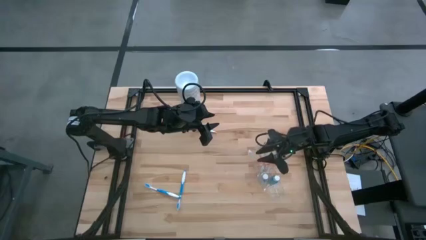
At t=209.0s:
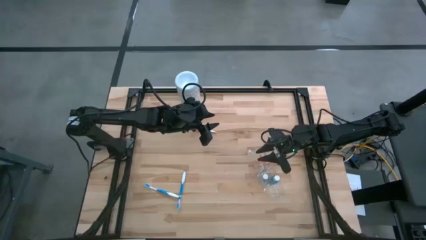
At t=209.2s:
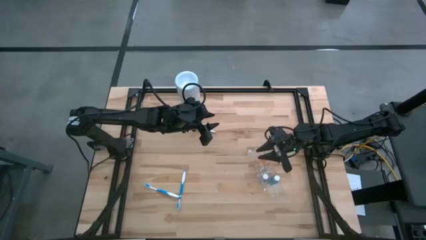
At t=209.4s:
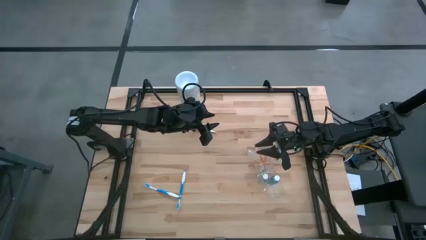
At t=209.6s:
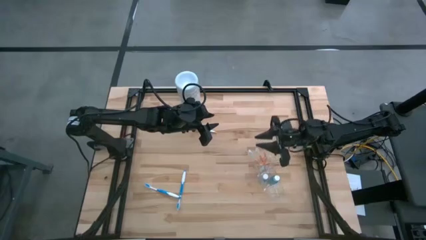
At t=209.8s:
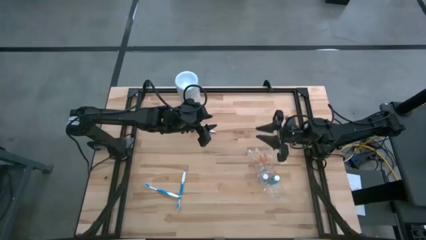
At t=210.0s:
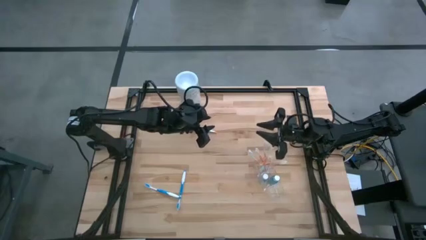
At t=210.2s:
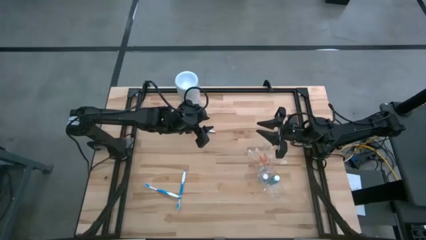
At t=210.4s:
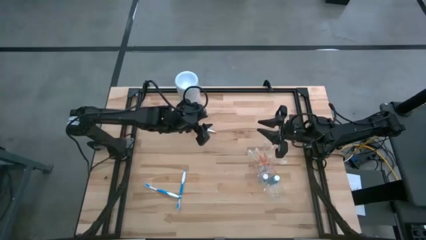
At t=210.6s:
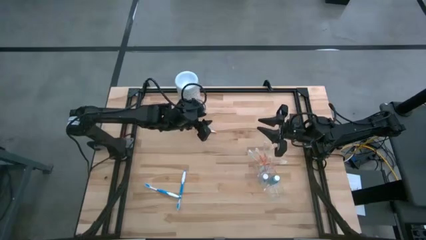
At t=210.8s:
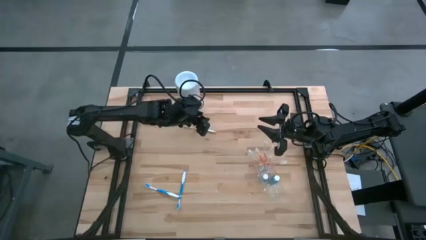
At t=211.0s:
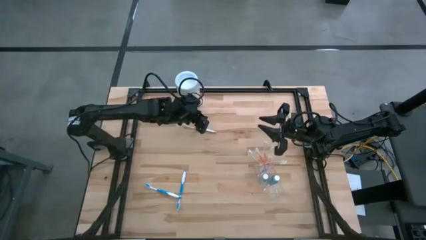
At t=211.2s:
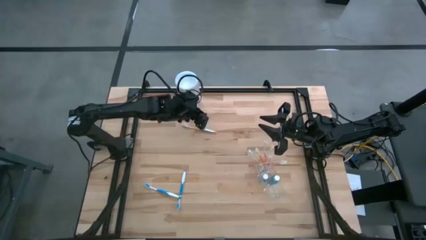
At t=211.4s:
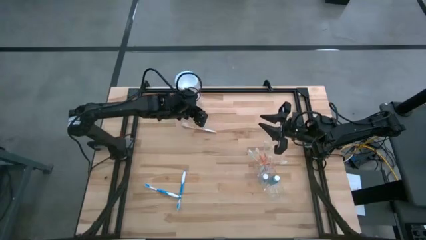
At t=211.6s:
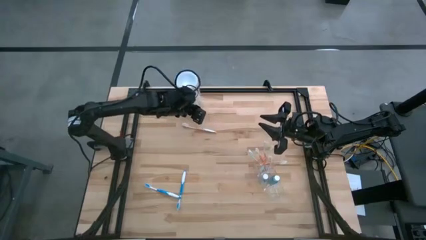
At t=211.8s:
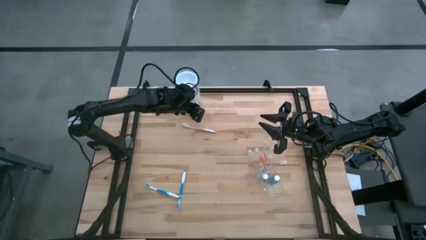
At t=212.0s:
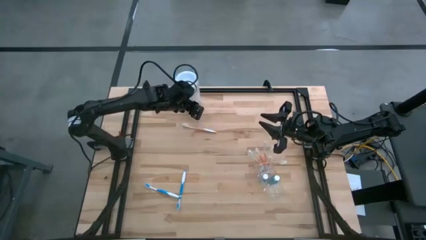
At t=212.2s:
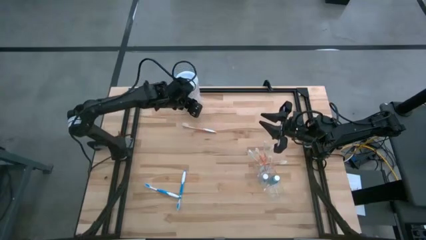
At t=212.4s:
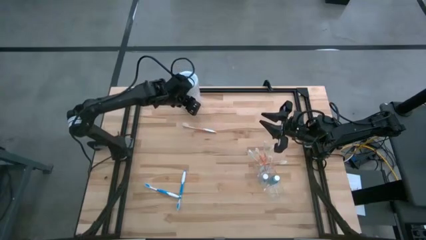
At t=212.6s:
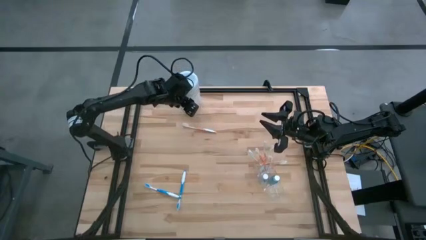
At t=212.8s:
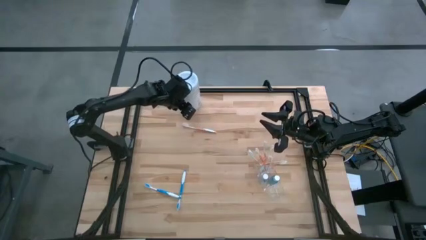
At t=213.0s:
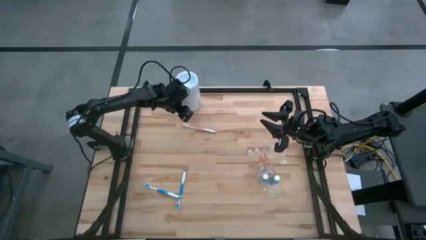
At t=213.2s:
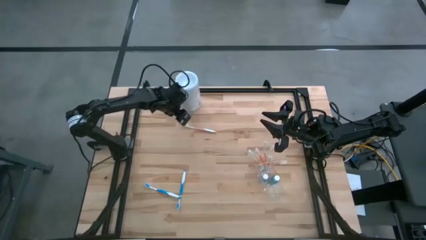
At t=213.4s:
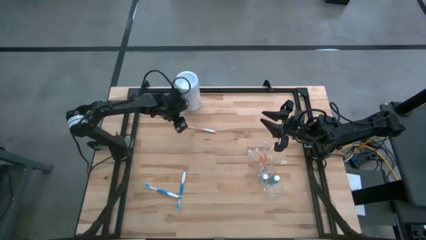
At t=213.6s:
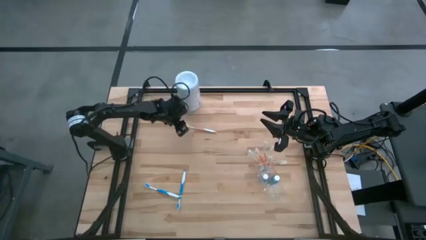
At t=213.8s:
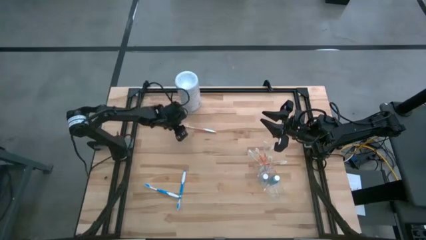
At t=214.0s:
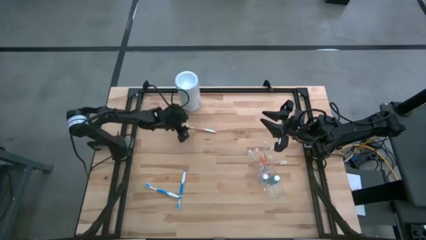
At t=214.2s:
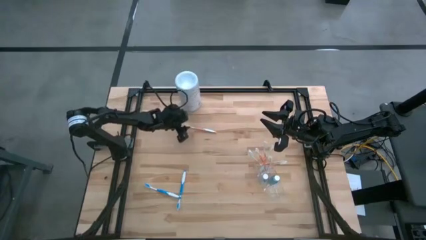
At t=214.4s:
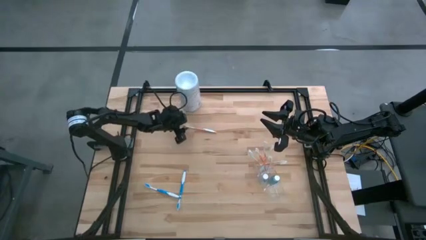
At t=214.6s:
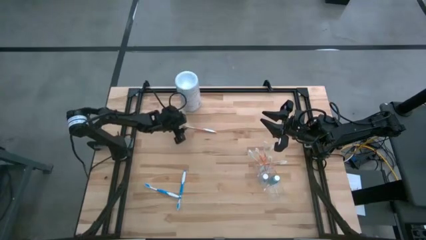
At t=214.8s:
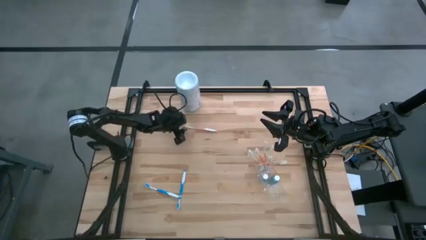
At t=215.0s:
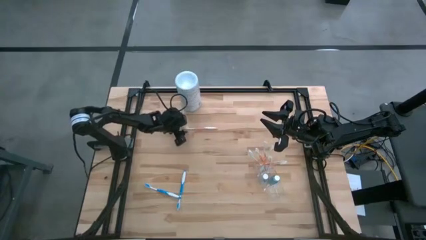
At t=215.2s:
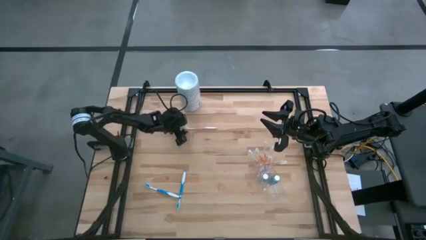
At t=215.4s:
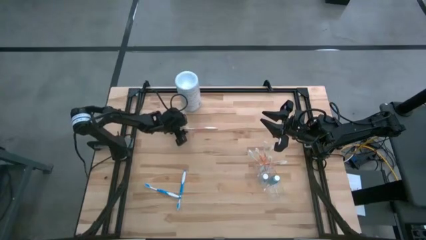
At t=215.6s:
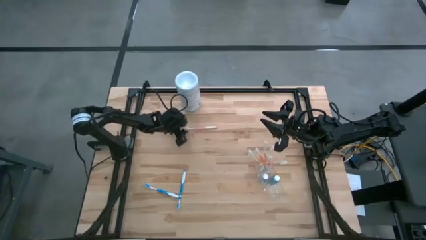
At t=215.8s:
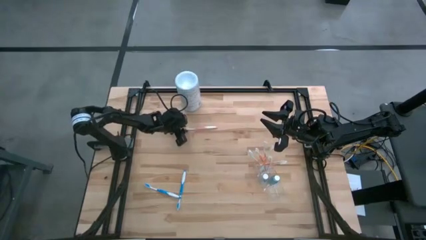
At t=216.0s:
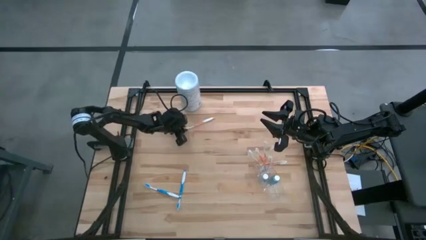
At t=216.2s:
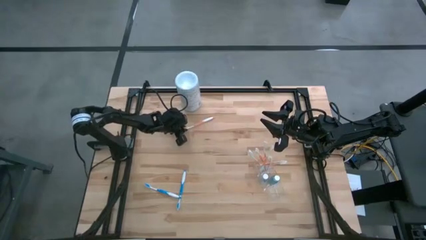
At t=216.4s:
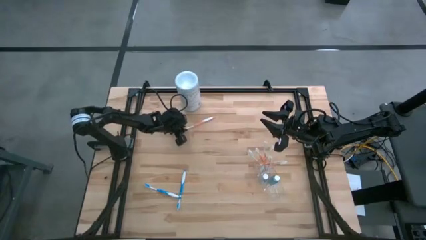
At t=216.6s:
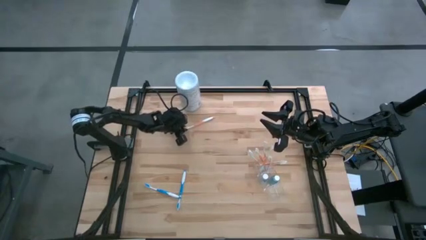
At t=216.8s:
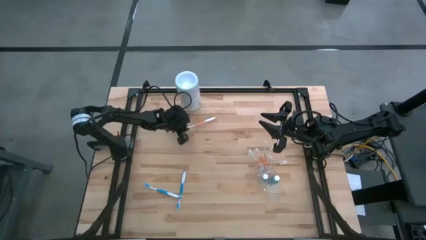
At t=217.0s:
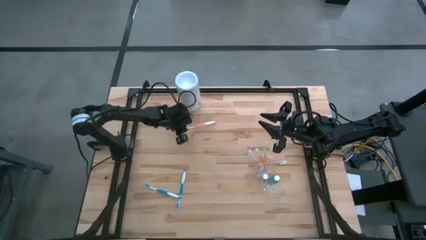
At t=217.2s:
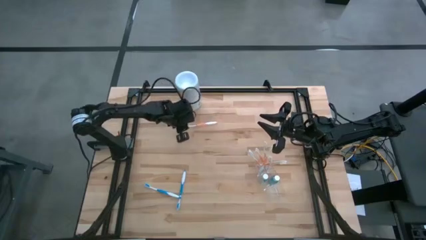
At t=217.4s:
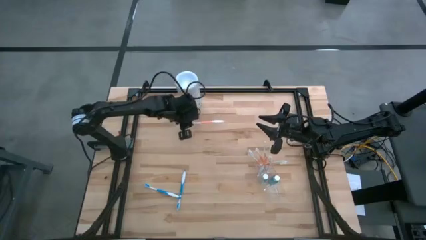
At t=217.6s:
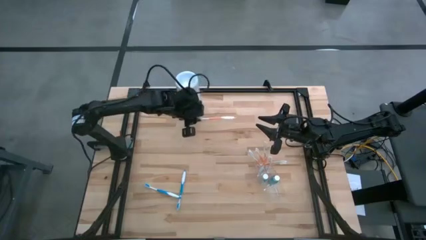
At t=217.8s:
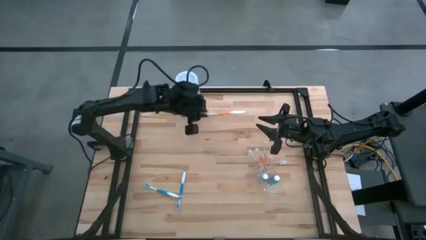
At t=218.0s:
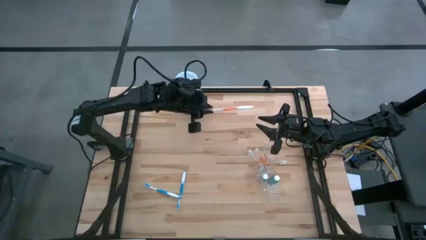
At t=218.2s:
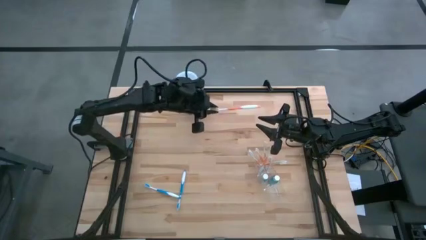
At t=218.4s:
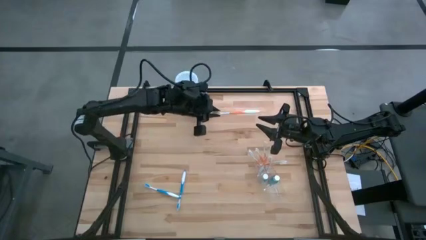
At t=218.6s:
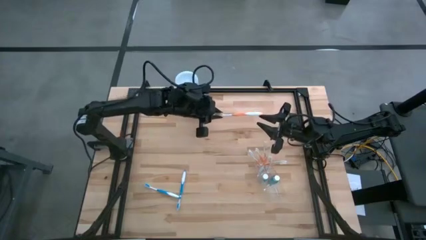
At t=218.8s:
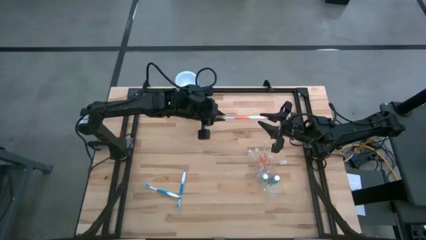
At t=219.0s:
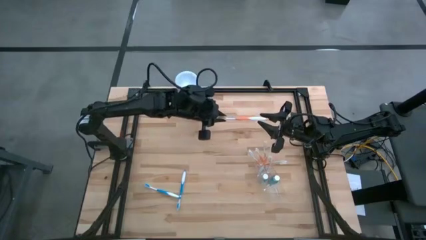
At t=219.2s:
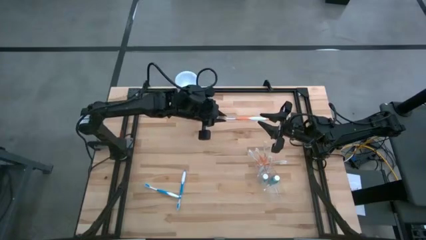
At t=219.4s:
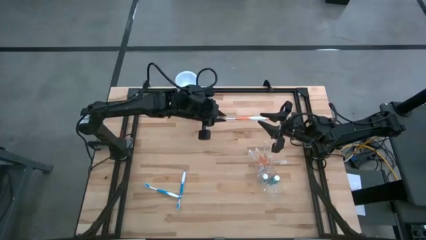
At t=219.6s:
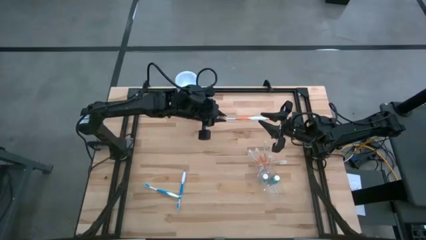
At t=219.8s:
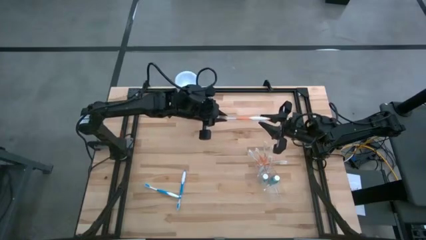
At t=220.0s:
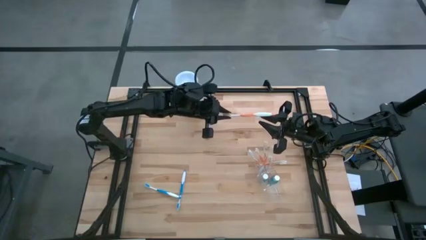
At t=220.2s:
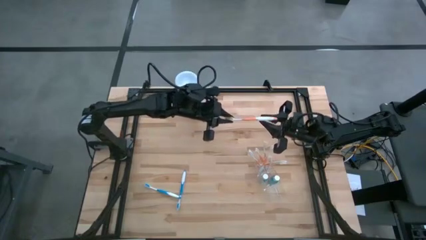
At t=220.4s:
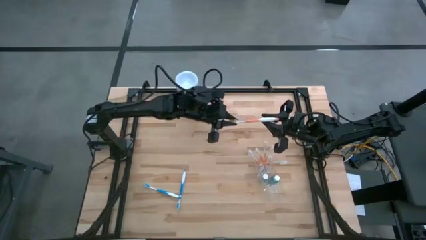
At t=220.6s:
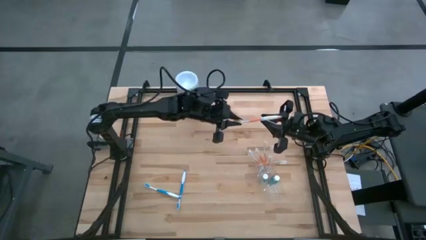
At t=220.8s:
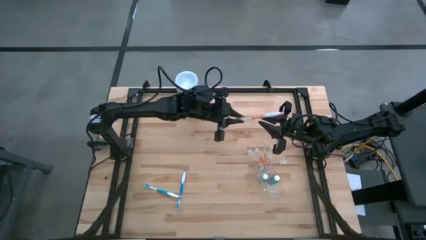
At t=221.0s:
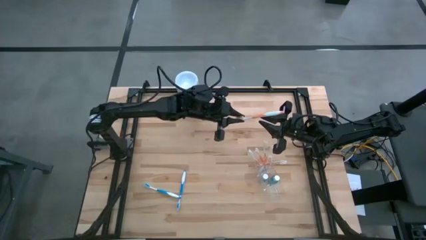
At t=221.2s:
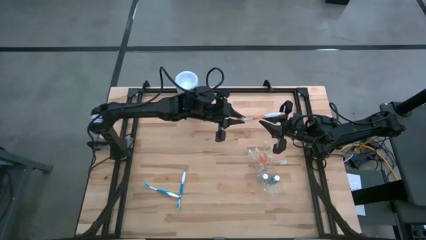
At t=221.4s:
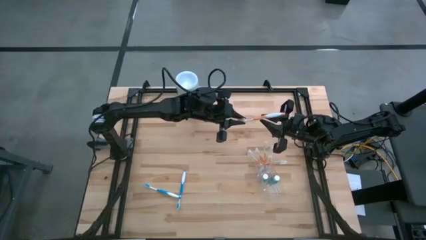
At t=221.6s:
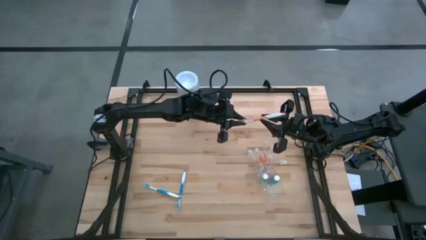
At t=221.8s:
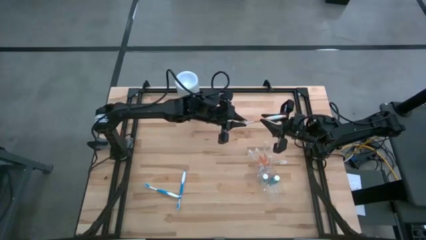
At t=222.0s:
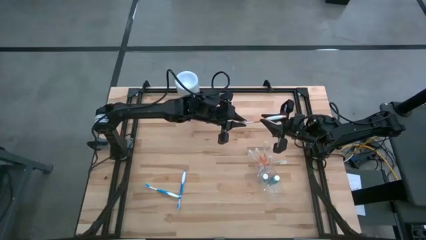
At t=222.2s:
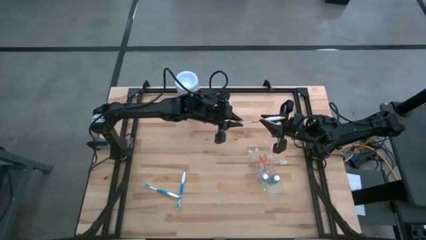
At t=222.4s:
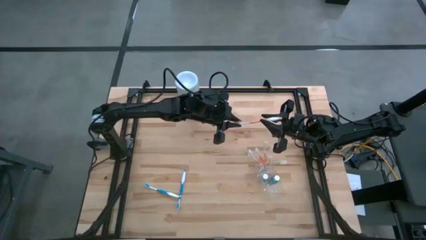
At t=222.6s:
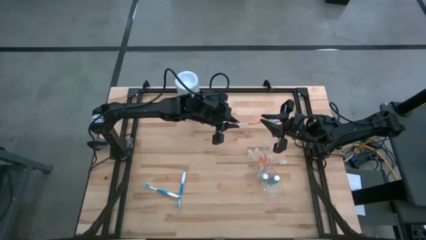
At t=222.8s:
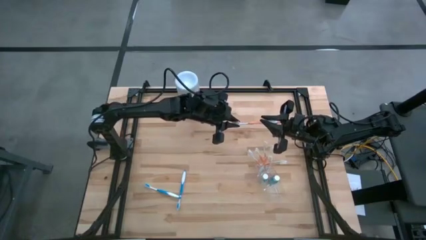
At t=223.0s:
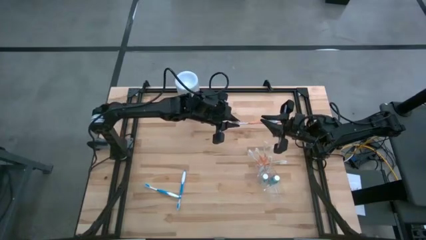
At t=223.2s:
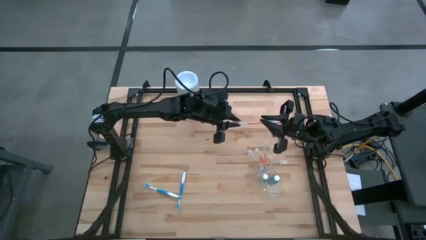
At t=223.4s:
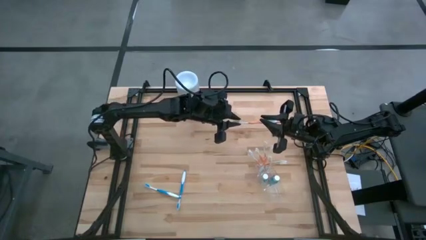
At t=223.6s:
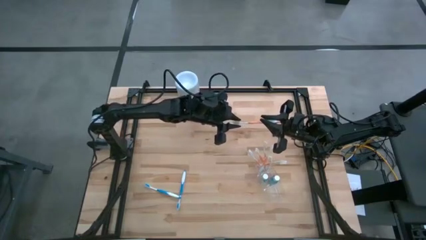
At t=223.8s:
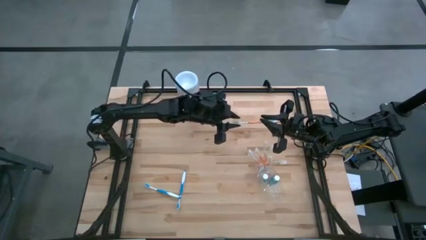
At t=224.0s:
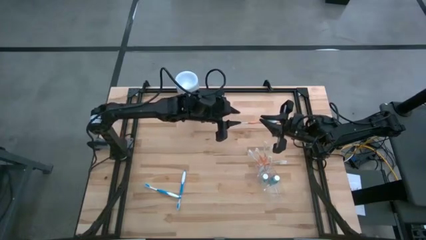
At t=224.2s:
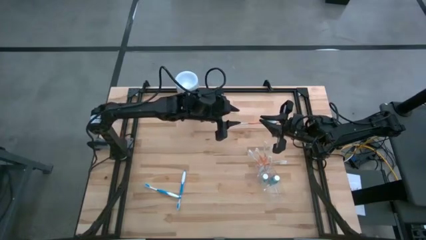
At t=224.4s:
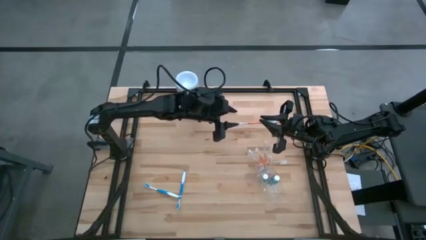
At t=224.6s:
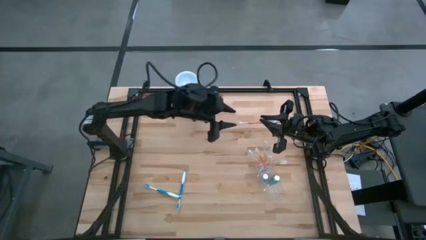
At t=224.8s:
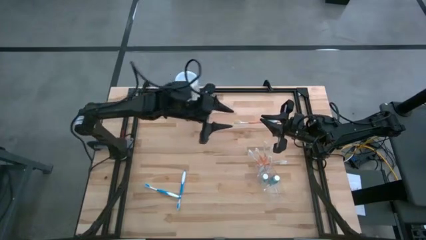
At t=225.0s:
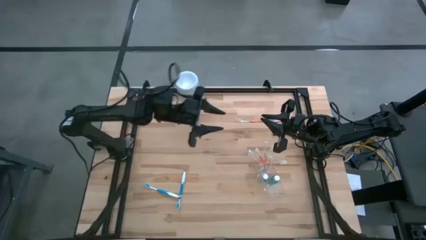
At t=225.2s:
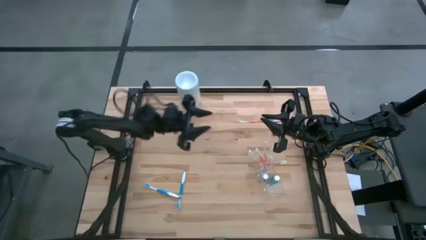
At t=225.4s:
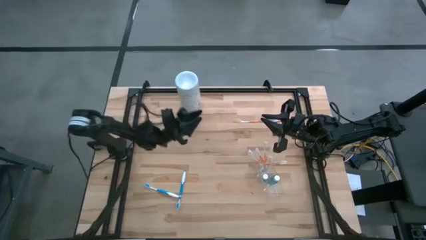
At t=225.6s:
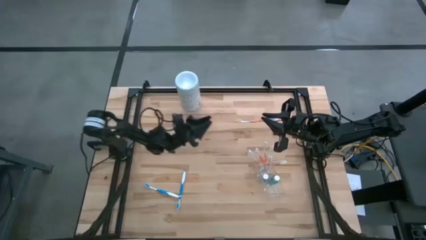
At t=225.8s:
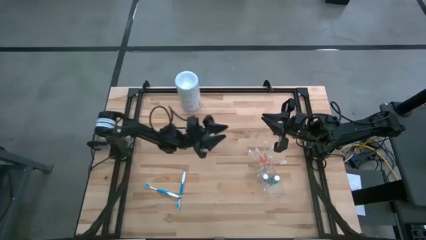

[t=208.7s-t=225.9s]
Task: Pick & Place toothbrushing station
Put the orange toothbrush into the top section of the transparent organizer
